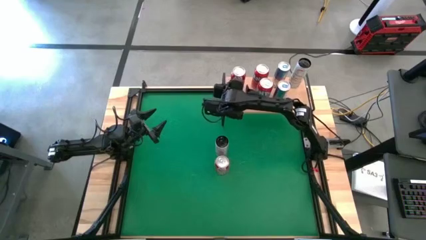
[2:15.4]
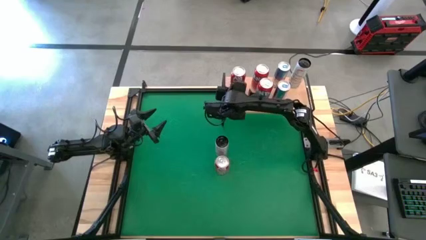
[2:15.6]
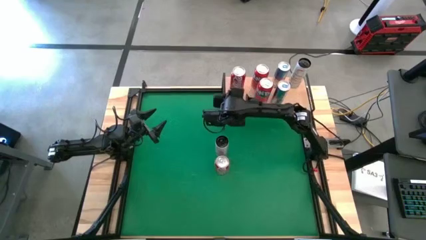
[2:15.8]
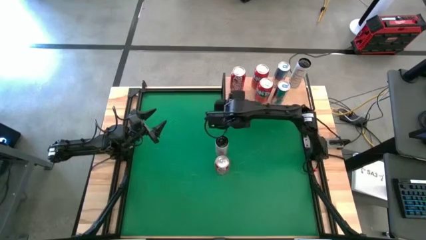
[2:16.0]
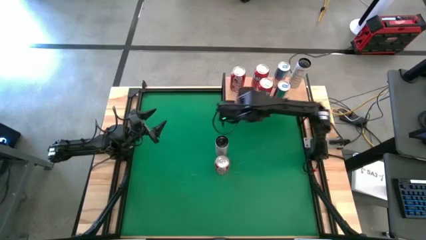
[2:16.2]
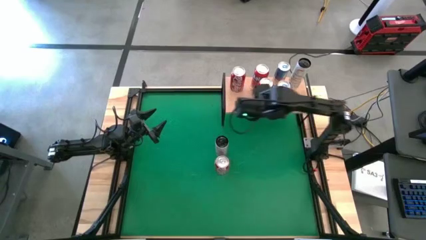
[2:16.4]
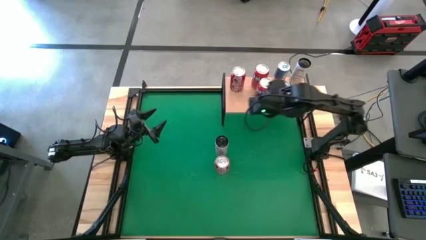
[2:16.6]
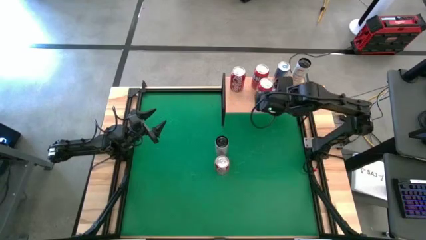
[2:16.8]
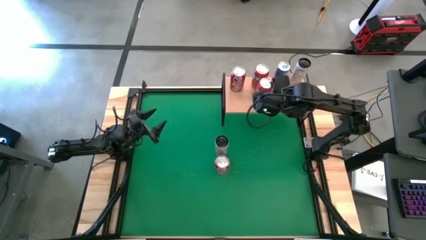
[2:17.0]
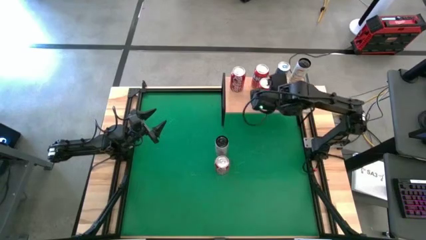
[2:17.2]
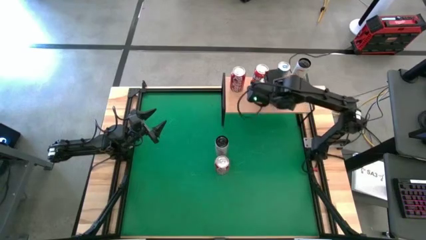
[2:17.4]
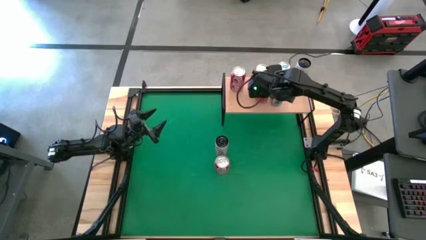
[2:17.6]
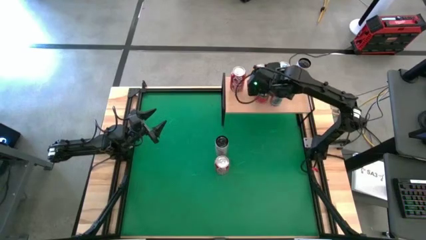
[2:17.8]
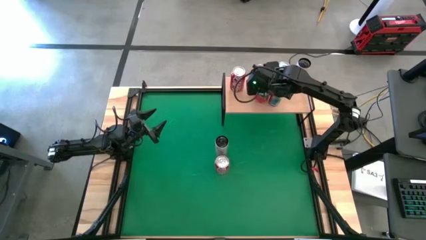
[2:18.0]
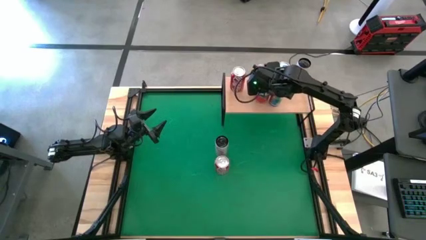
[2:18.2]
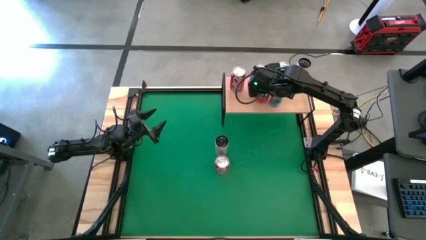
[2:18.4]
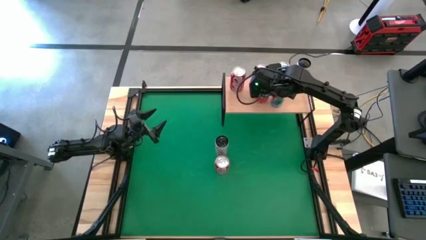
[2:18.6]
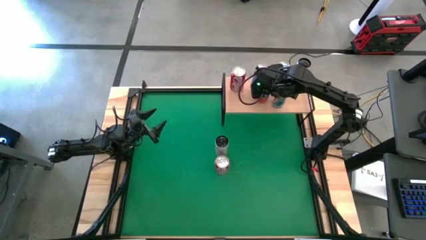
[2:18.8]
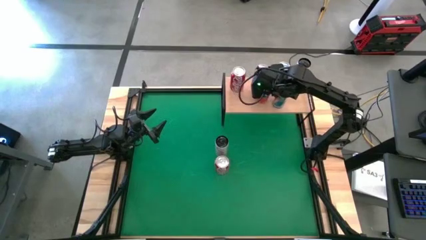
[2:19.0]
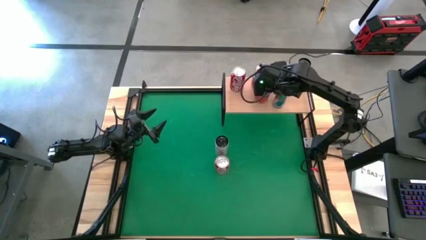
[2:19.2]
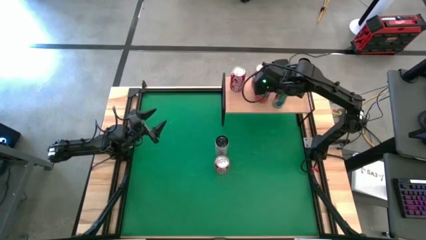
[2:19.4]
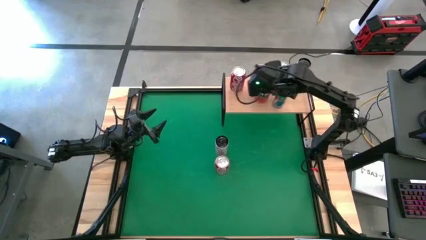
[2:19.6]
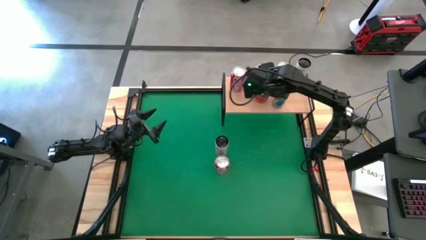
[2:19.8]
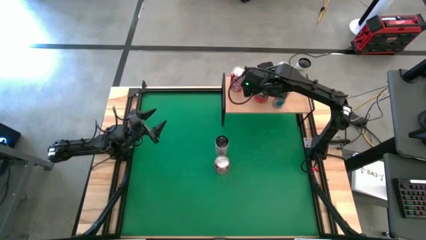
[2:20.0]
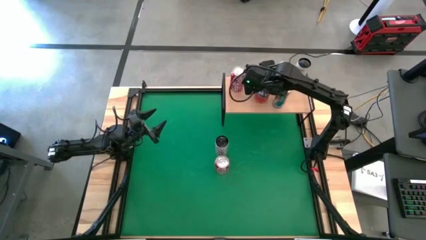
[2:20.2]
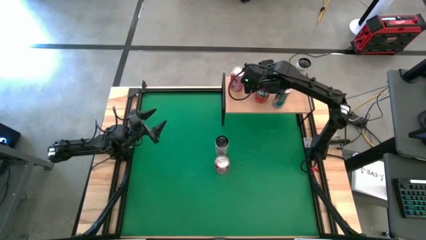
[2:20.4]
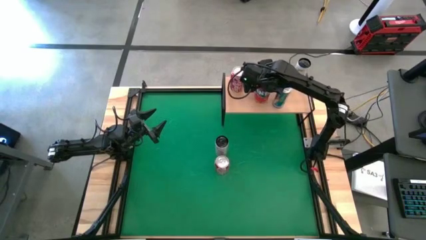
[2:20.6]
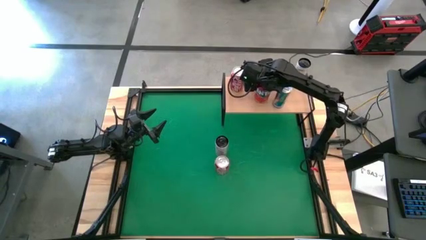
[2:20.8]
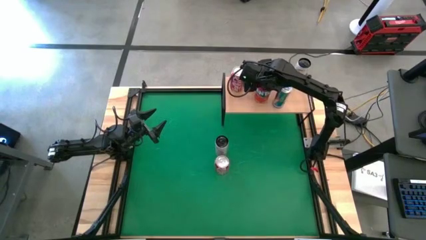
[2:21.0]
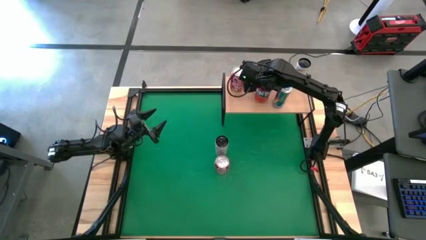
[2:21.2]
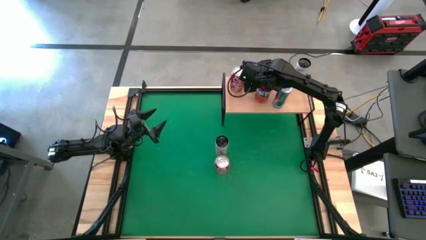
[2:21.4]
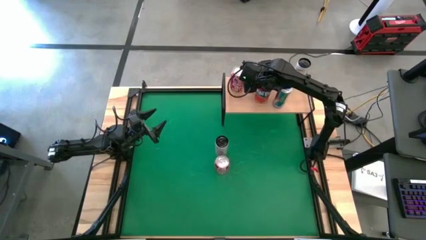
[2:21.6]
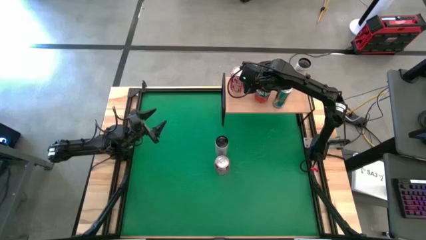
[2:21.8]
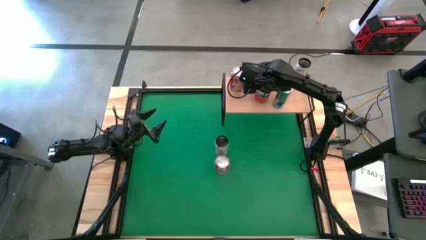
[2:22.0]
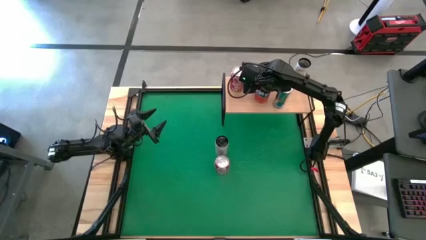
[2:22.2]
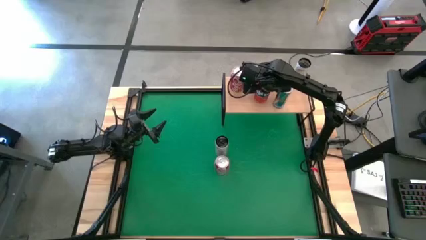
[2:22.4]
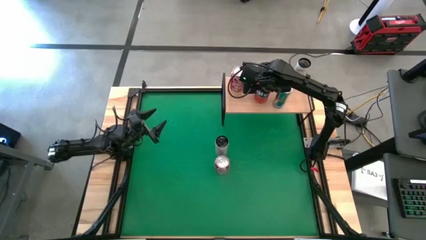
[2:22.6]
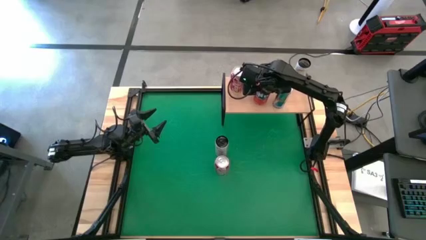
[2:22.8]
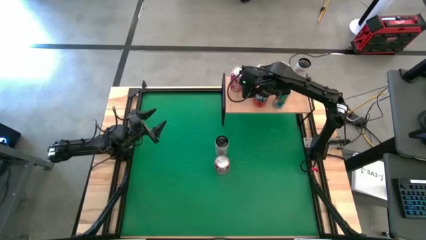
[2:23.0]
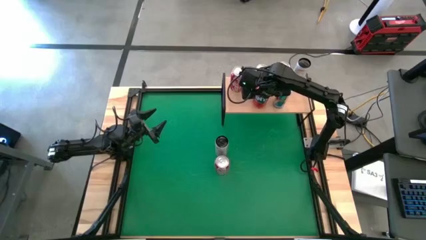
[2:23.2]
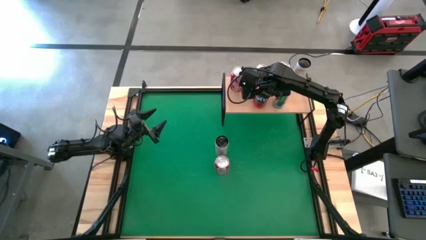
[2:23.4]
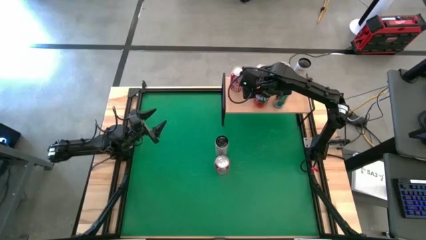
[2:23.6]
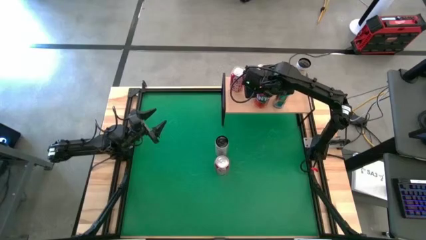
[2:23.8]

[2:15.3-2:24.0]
Task: Place canned beverage on shelf
Adjust the soda cans on the shelf

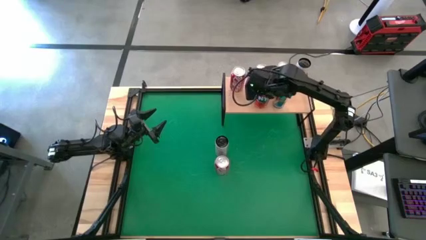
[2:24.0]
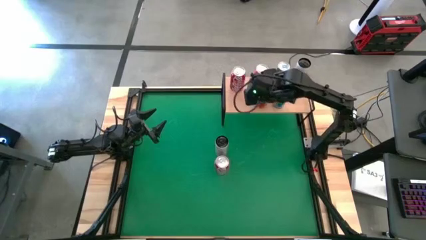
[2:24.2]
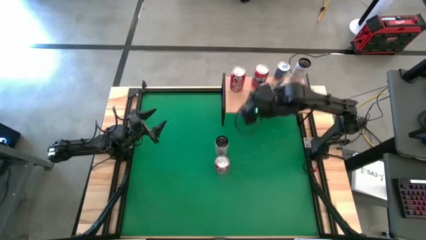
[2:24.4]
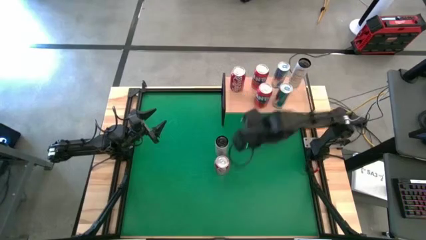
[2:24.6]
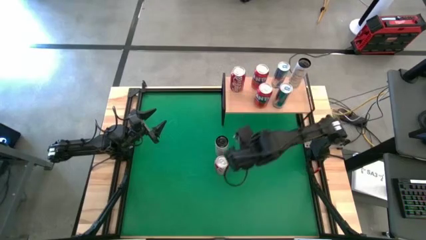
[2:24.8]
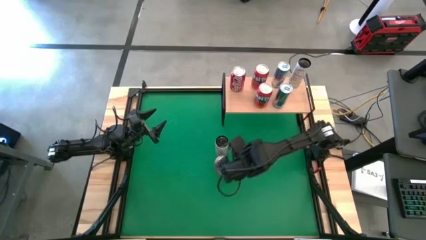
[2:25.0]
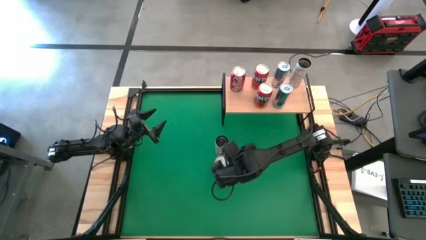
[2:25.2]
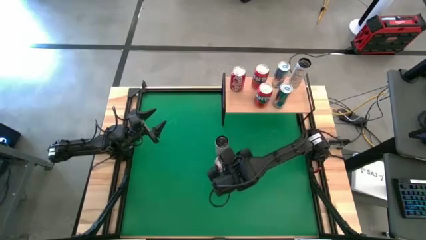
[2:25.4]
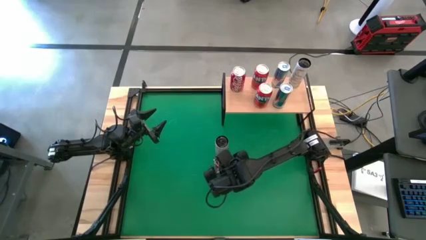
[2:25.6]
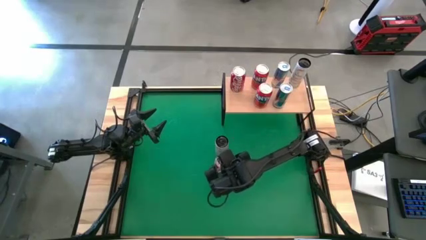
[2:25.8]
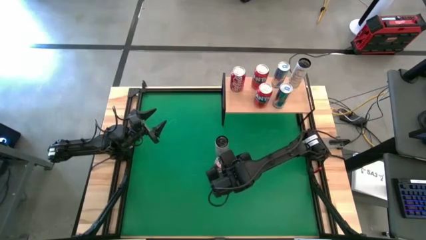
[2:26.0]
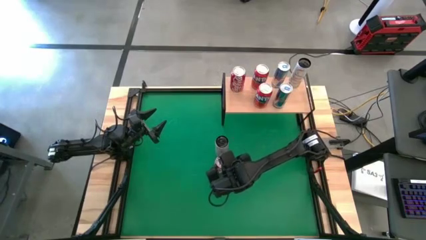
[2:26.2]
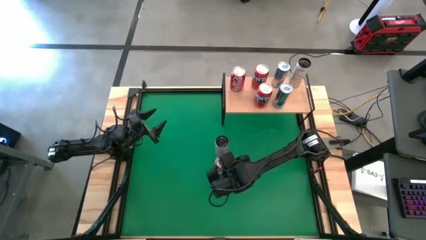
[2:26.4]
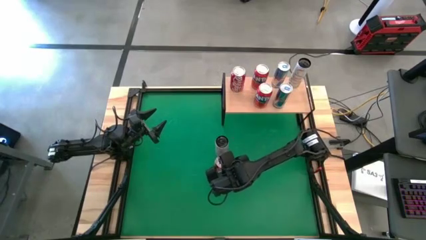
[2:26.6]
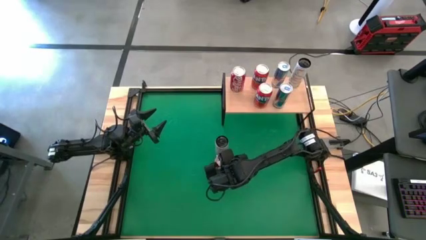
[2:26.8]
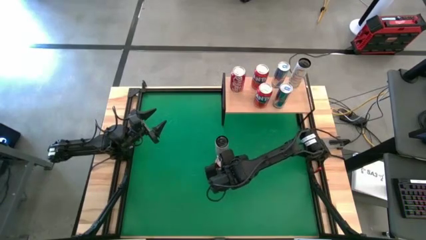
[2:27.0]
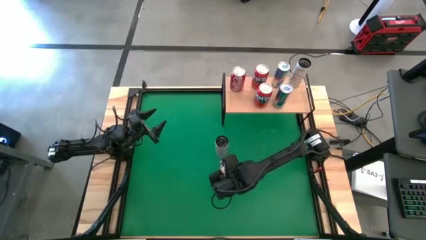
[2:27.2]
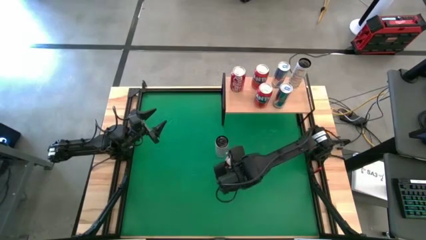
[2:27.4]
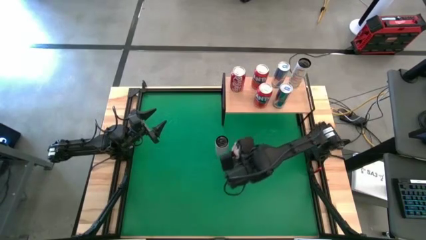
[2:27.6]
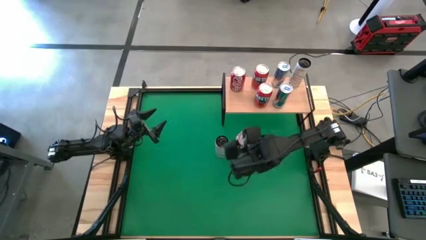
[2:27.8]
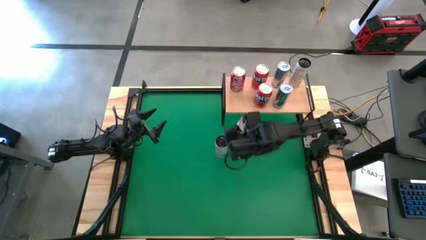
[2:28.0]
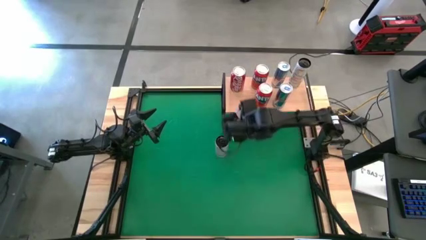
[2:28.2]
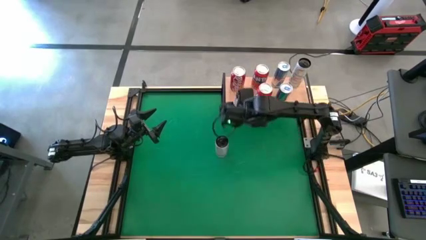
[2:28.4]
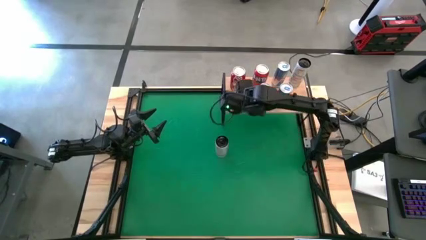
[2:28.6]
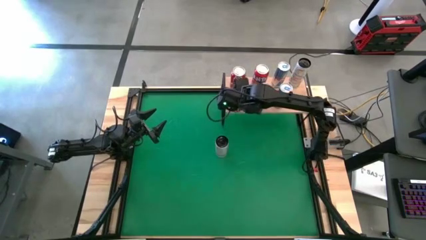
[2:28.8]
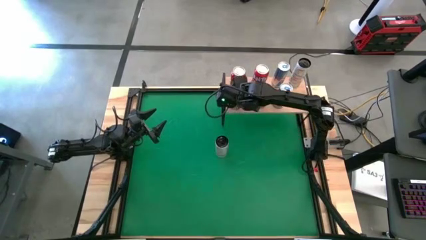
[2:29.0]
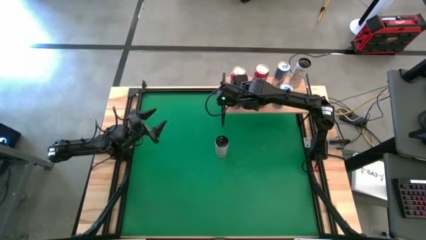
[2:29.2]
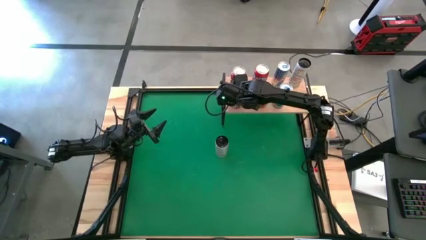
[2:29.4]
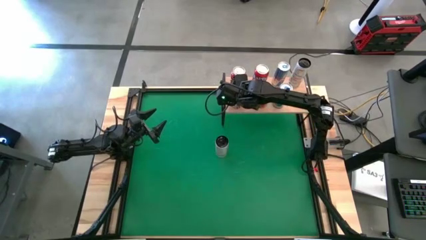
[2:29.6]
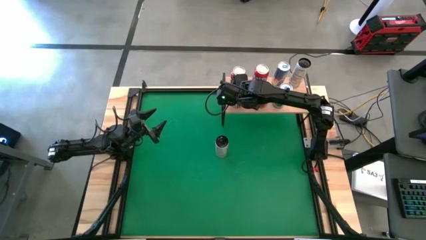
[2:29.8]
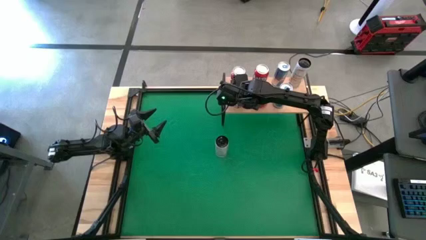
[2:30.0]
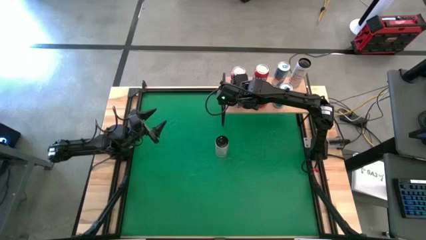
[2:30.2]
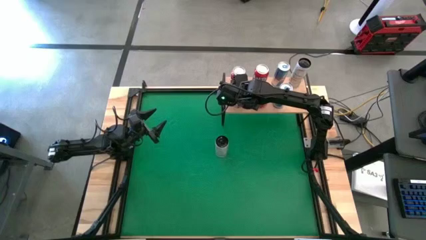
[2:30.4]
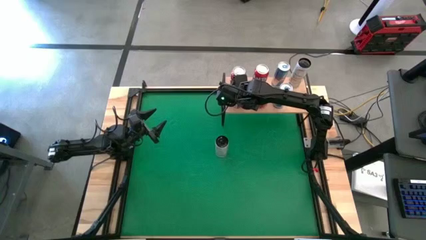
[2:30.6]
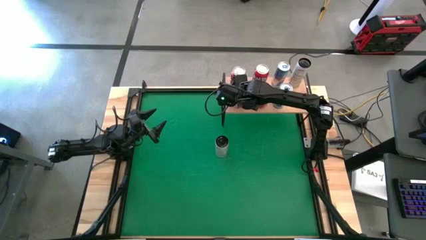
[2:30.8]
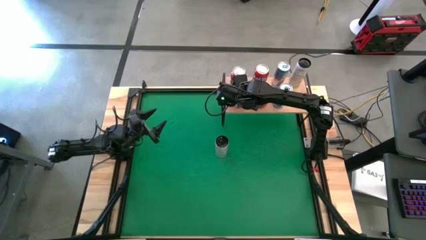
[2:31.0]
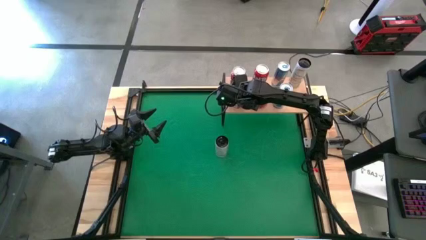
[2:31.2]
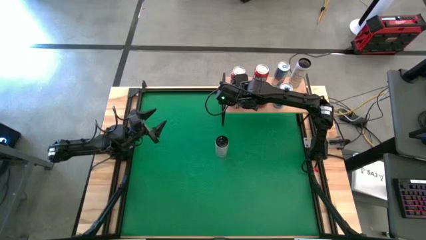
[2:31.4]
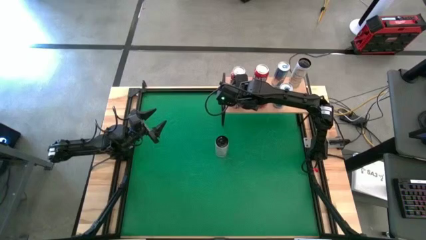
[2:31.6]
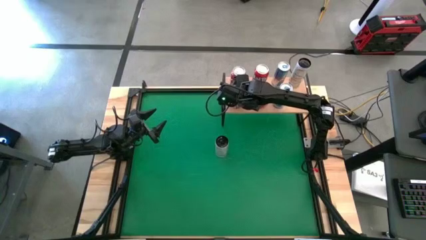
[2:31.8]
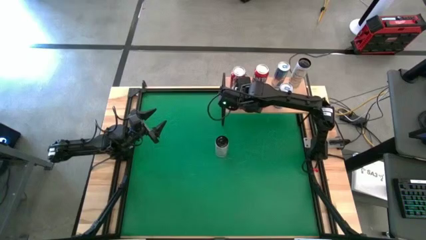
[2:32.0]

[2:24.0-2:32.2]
Put the red white soda can on the shelf aligned with the other red white soda can
